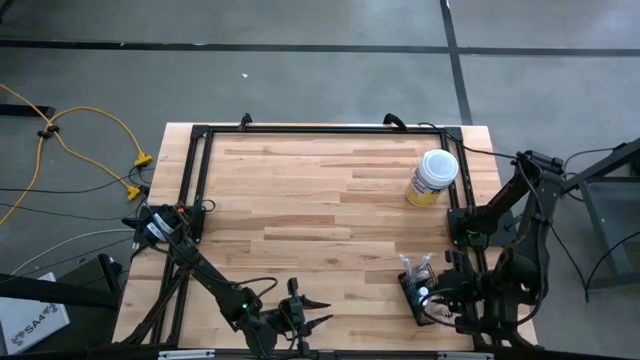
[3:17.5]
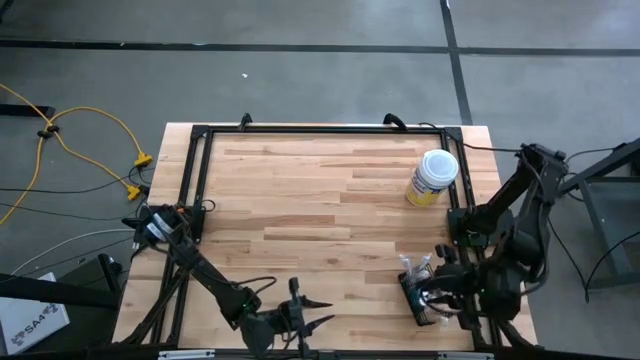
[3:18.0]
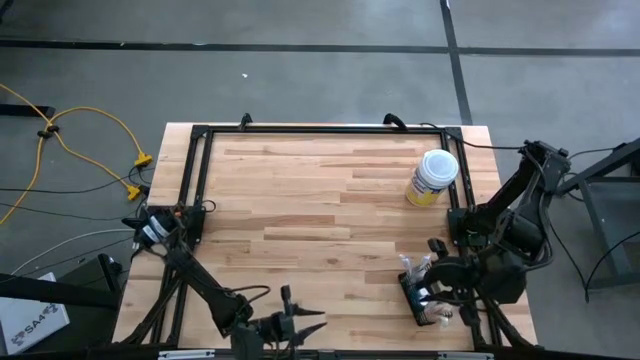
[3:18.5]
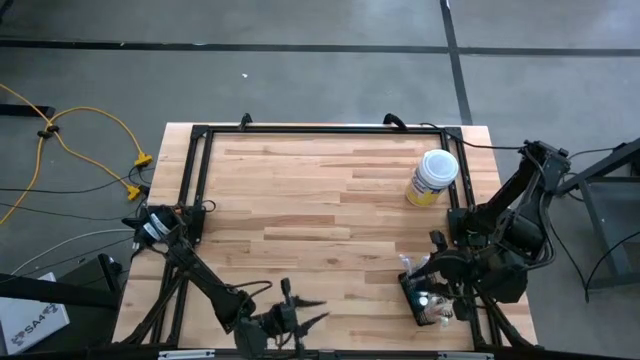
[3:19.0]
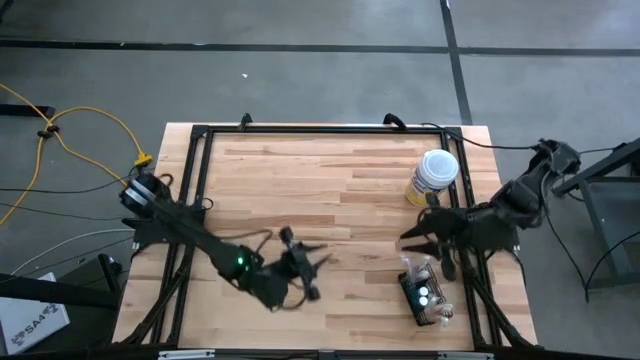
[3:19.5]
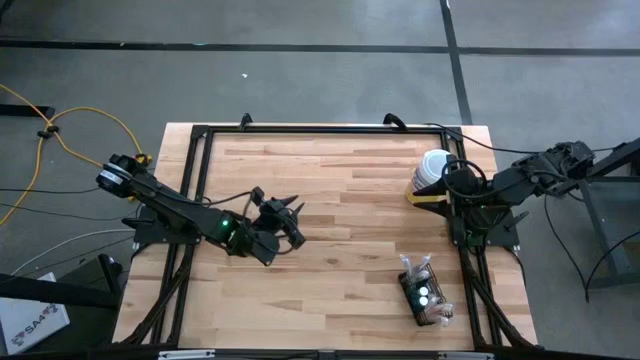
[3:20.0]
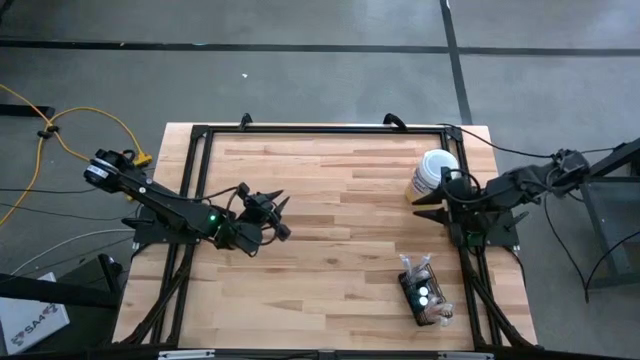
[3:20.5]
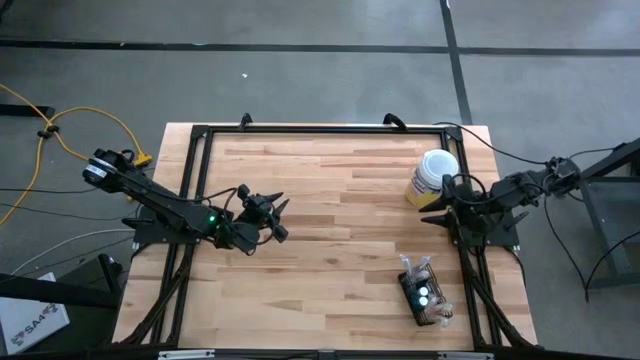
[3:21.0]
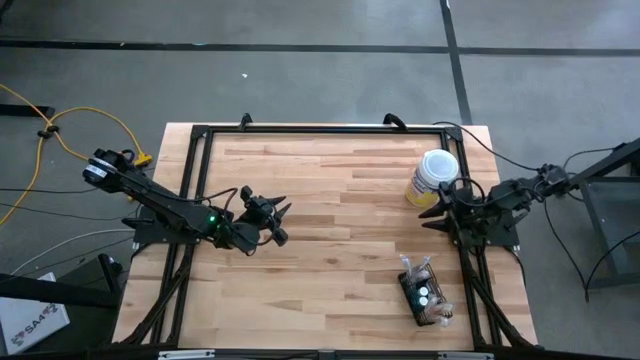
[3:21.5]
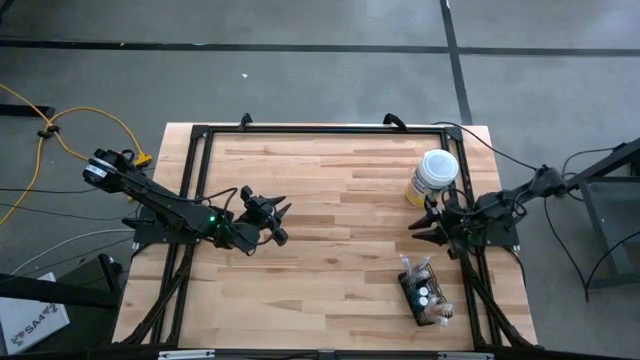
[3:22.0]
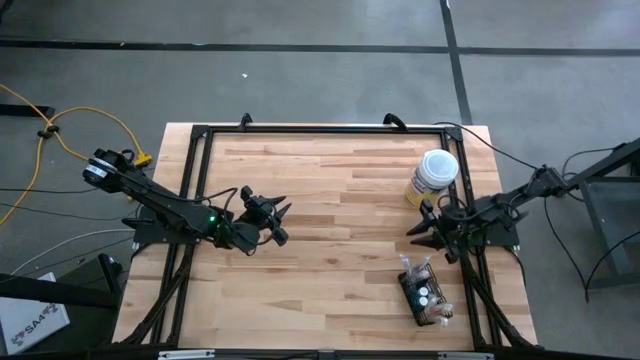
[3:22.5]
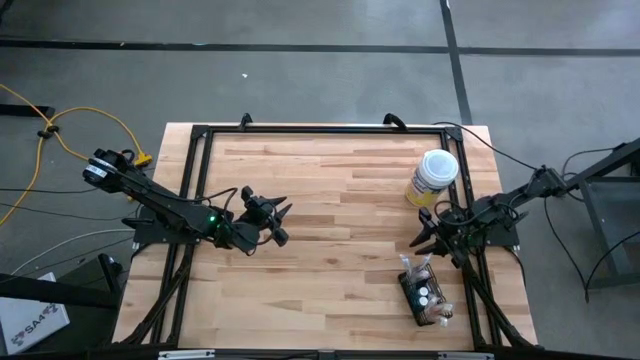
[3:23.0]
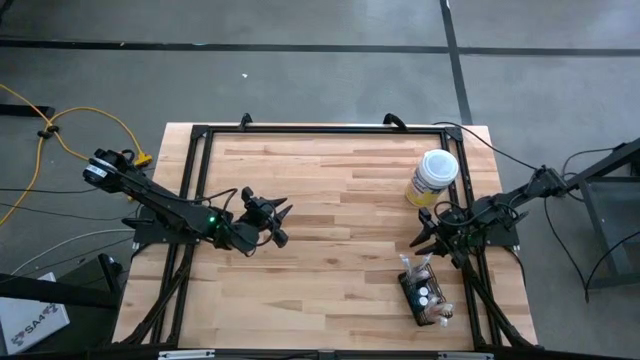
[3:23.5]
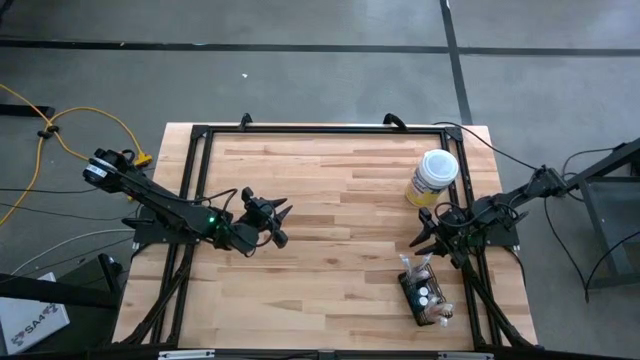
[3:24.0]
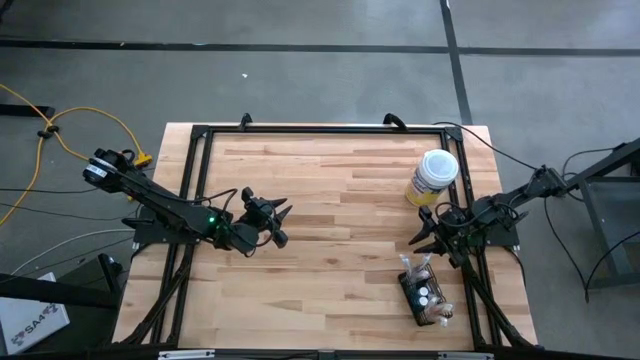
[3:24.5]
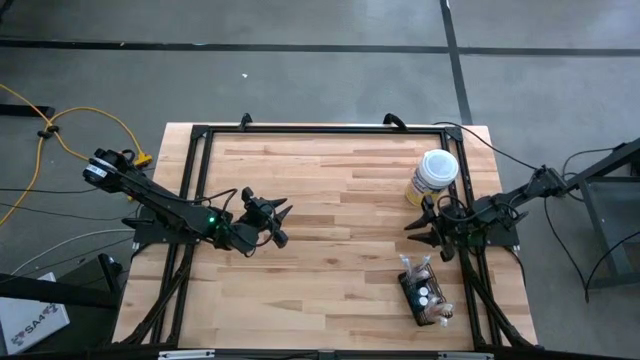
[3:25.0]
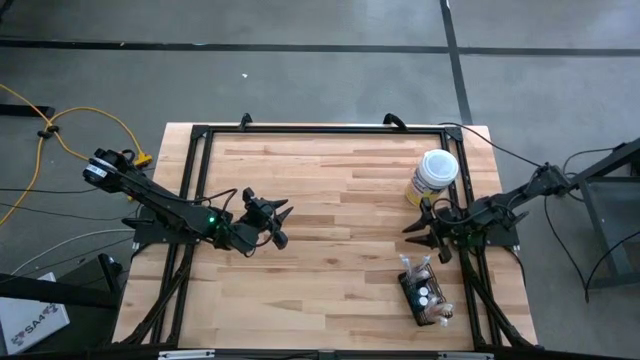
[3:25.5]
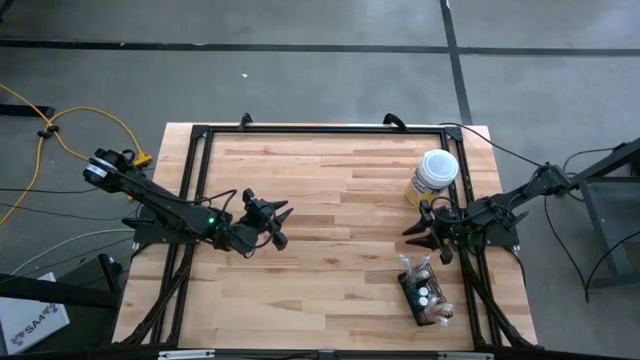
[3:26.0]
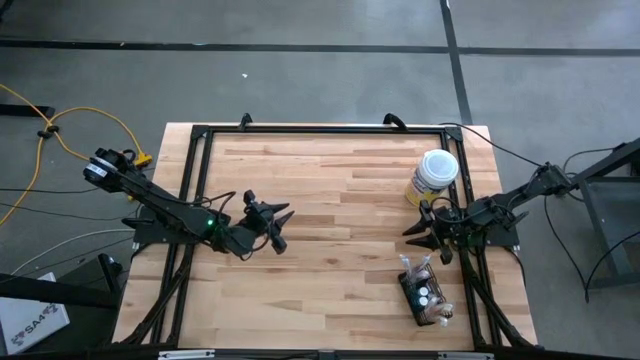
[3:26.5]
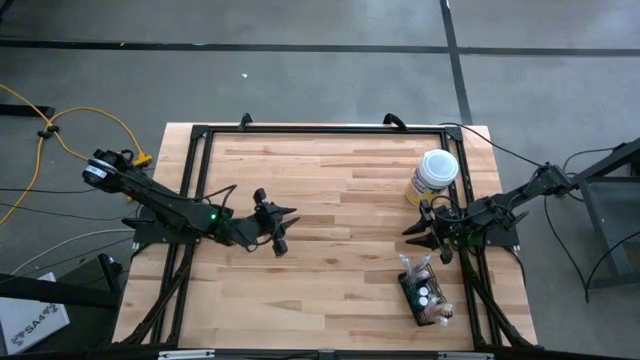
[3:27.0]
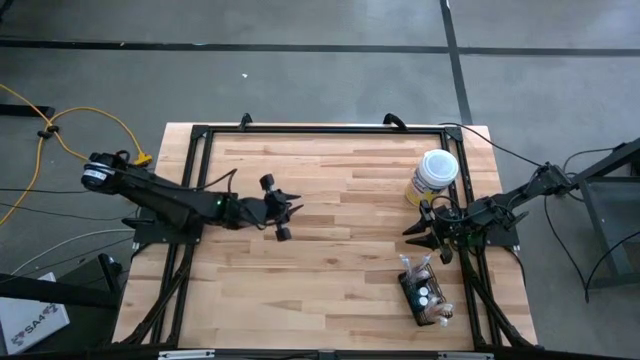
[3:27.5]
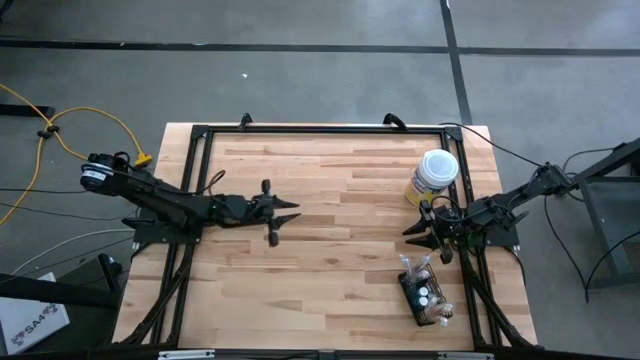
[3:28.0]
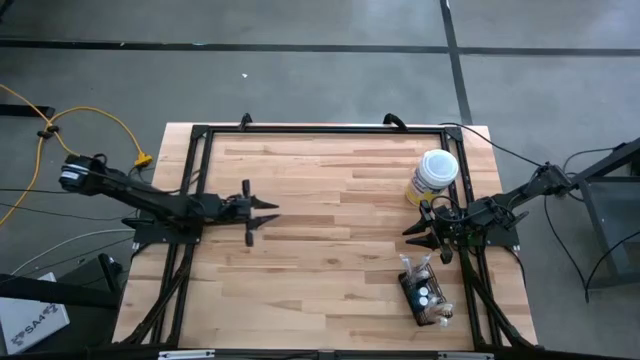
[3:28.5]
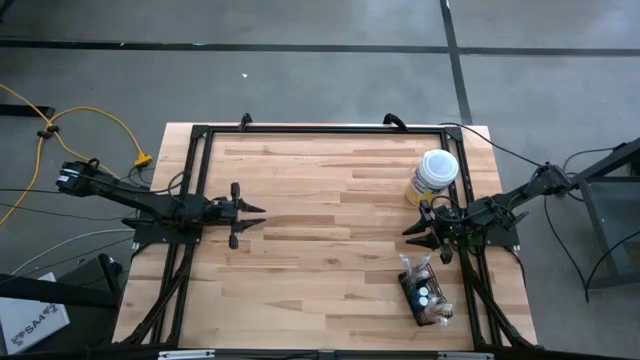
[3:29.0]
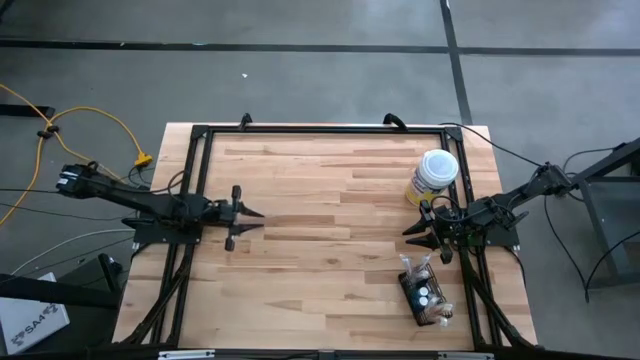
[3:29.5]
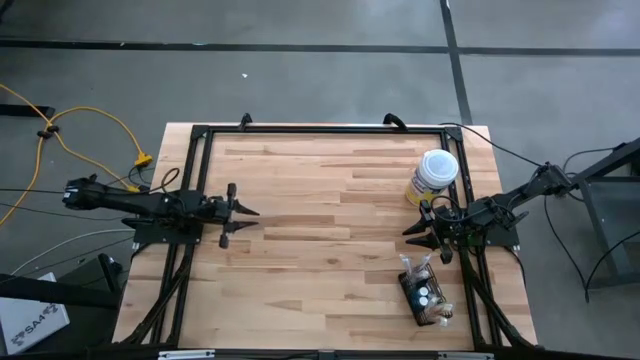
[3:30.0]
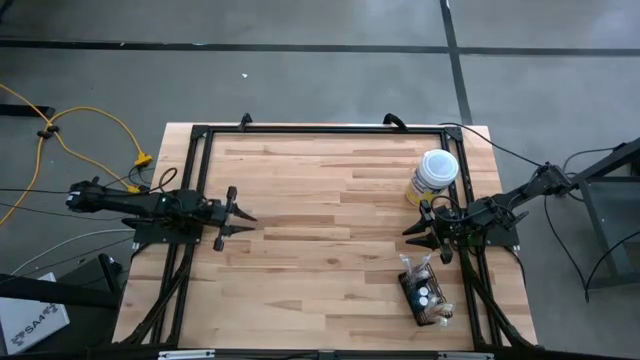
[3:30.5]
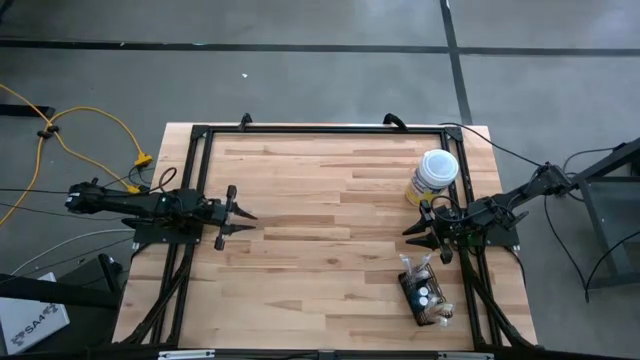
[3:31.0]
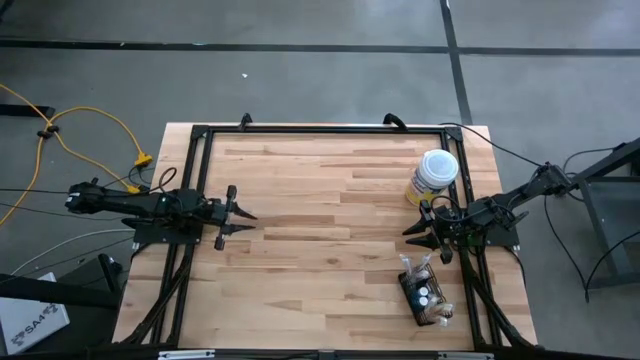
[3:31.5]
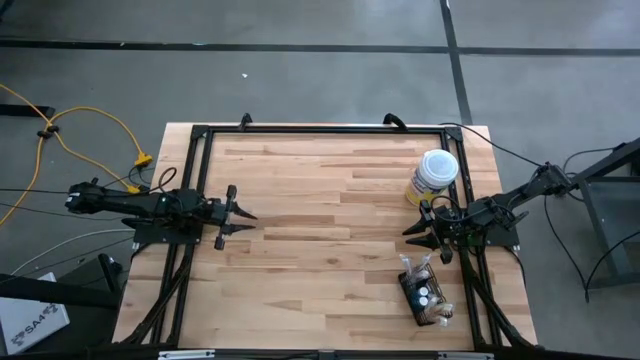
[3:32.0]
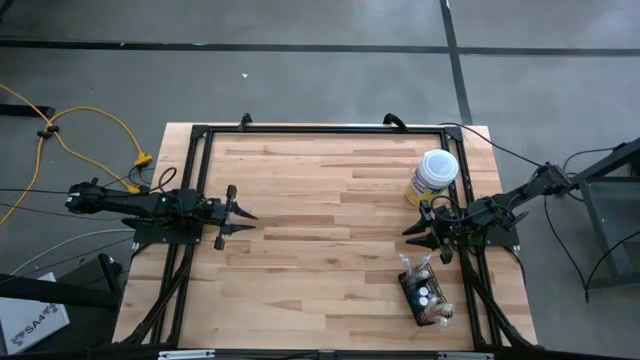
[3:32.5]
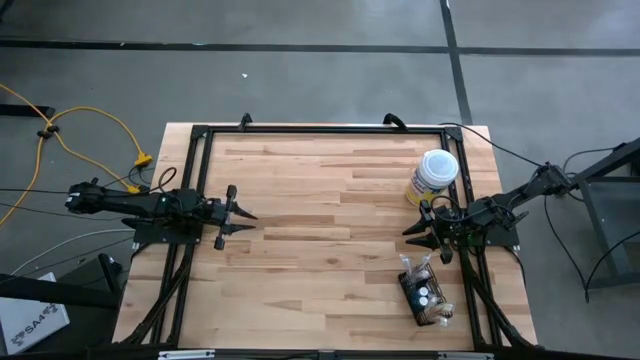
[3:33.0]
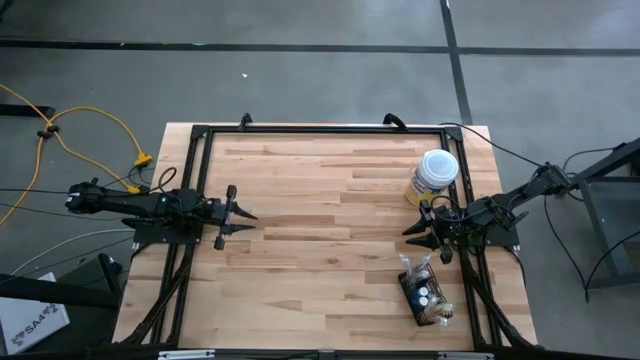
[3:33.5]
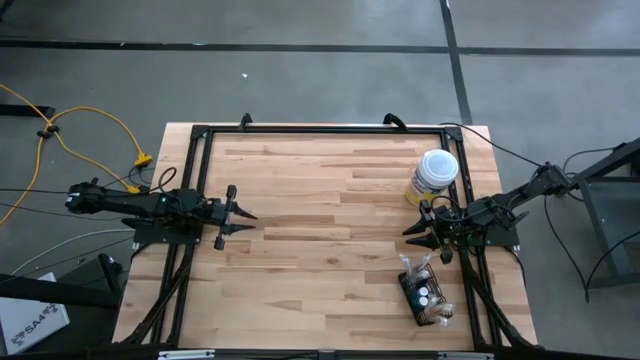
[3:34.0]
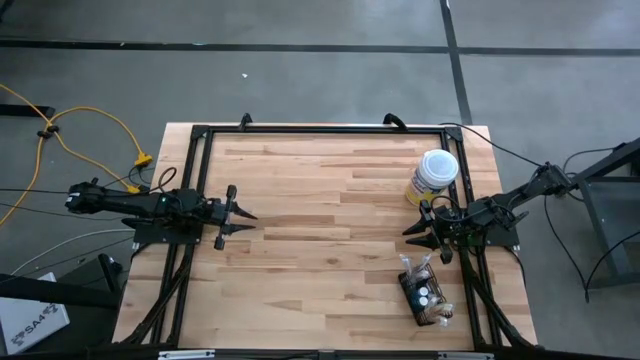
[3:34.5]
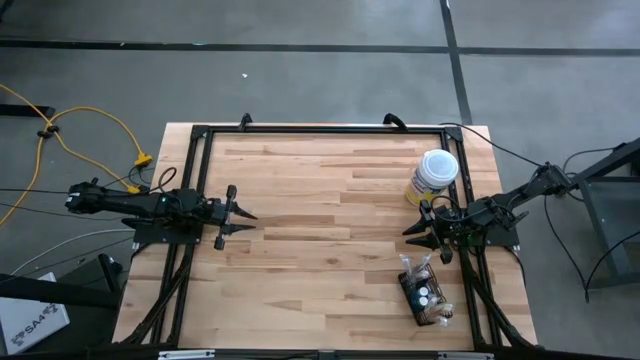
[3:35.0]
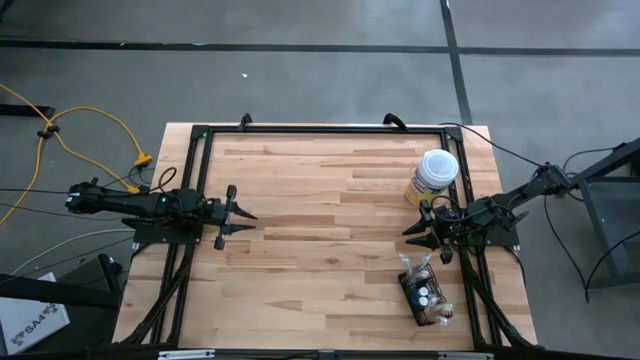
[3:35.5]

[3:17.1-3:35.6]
Task: Pick & Place toothbrushing station
Return to home position
